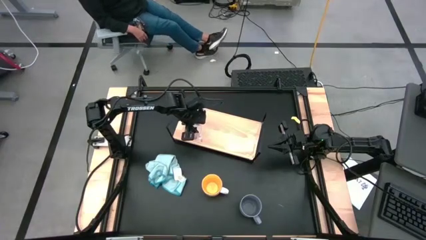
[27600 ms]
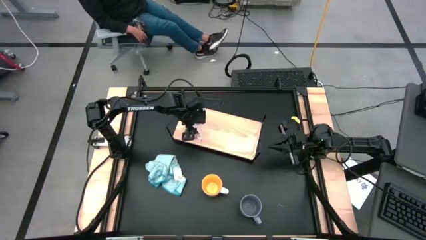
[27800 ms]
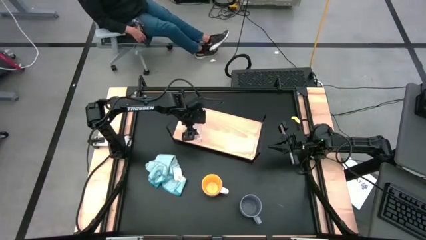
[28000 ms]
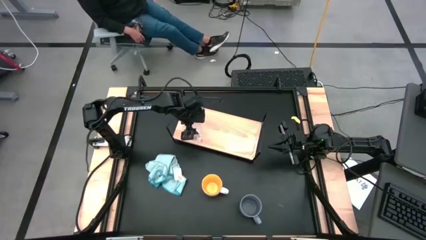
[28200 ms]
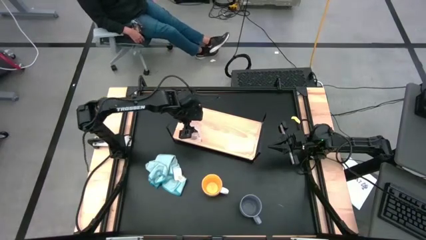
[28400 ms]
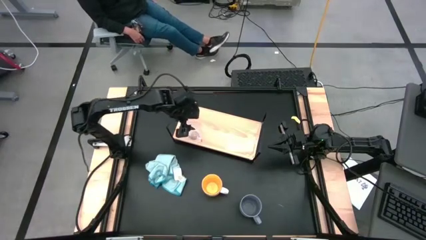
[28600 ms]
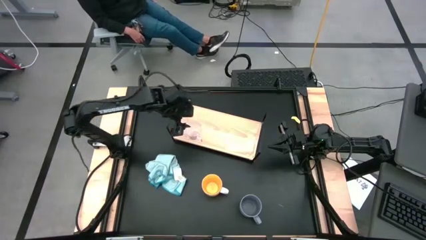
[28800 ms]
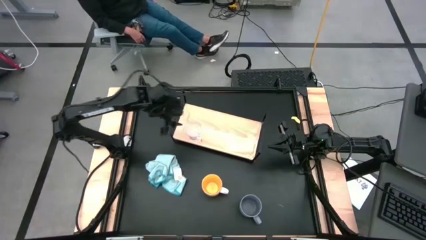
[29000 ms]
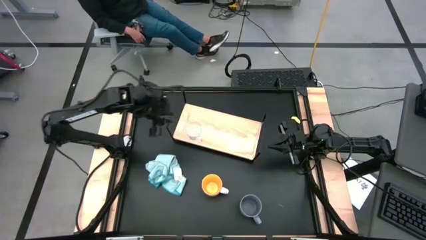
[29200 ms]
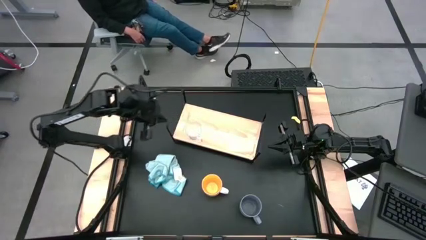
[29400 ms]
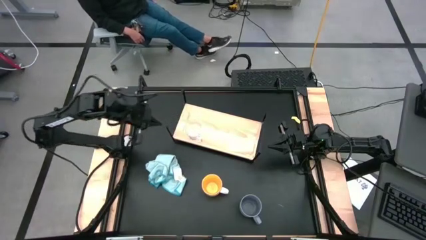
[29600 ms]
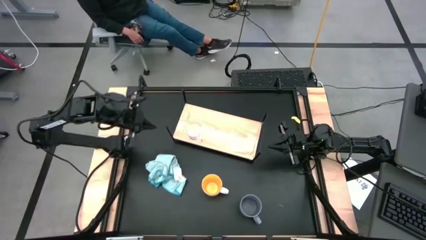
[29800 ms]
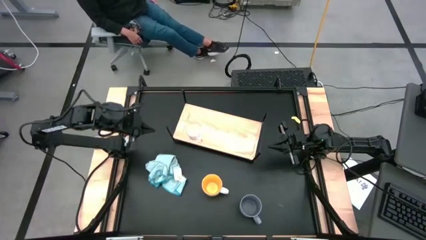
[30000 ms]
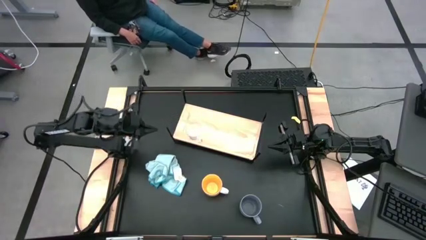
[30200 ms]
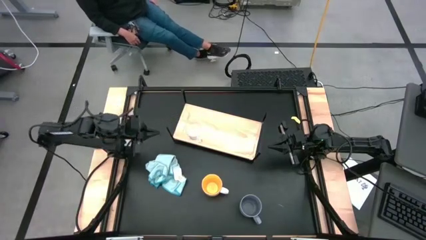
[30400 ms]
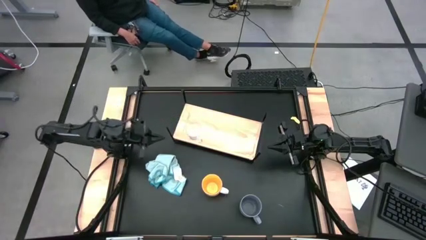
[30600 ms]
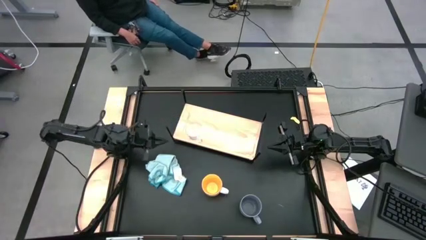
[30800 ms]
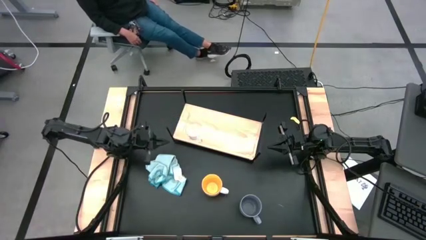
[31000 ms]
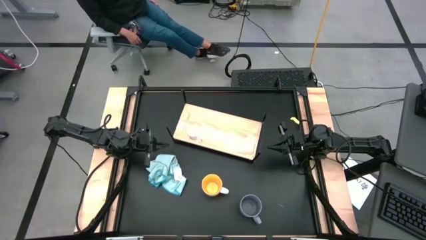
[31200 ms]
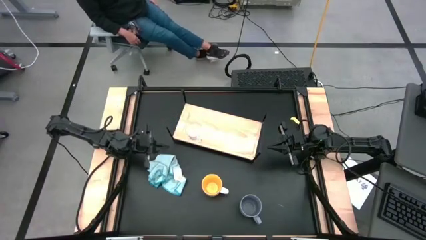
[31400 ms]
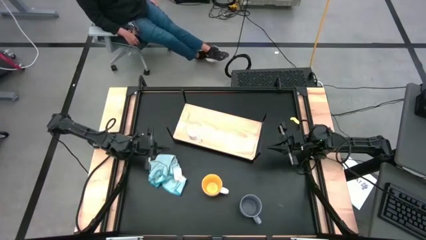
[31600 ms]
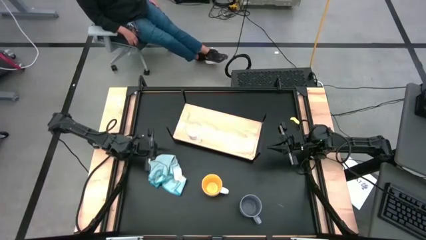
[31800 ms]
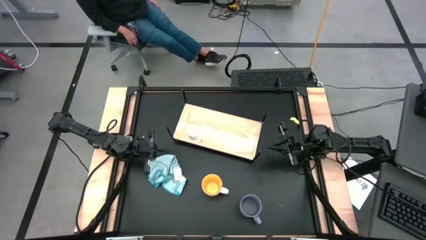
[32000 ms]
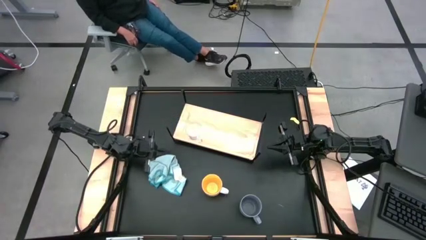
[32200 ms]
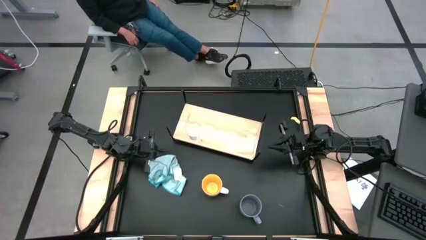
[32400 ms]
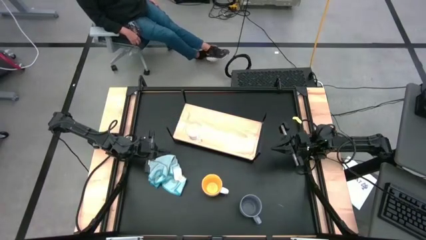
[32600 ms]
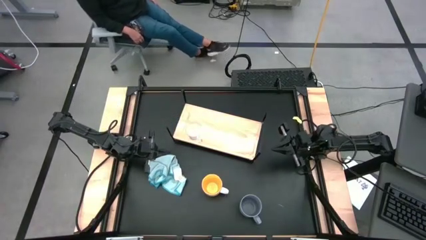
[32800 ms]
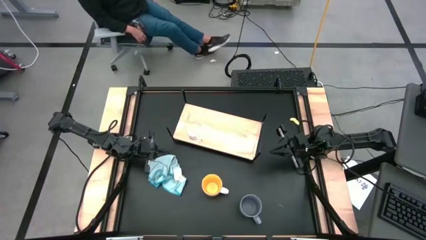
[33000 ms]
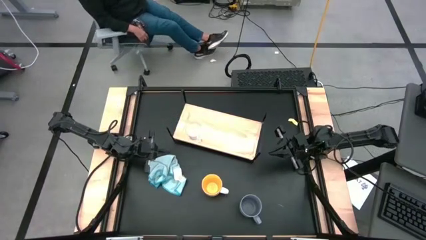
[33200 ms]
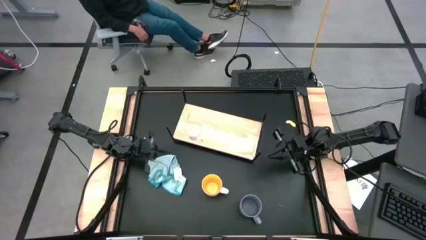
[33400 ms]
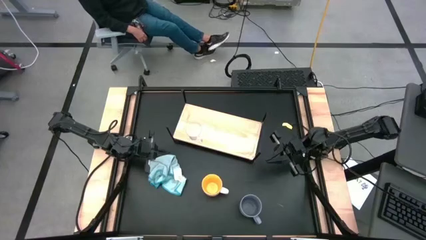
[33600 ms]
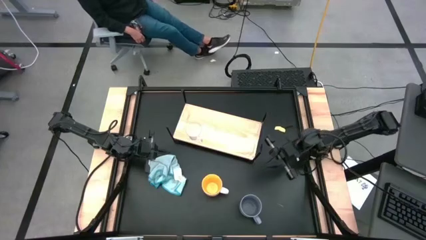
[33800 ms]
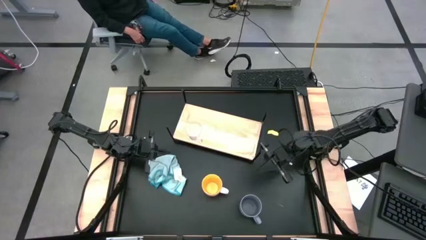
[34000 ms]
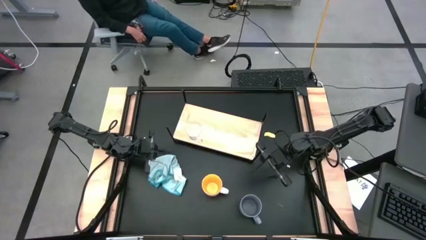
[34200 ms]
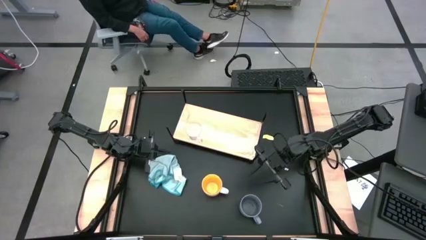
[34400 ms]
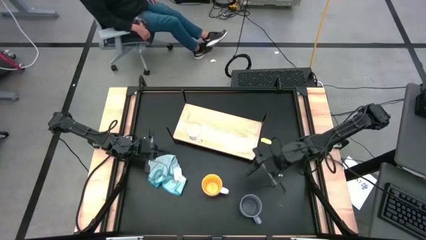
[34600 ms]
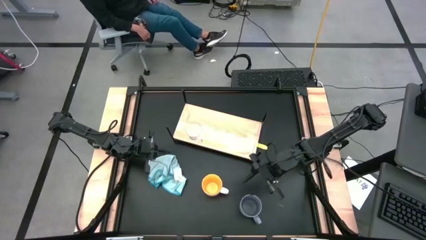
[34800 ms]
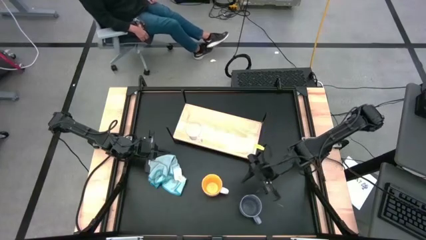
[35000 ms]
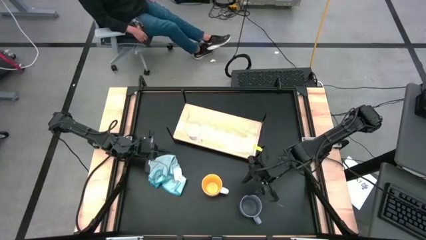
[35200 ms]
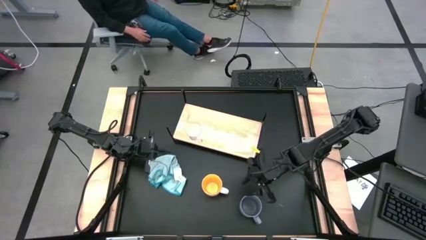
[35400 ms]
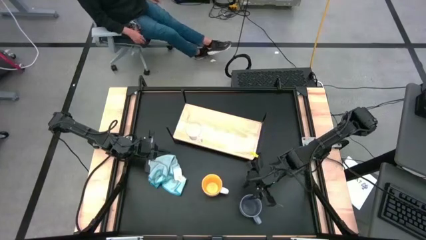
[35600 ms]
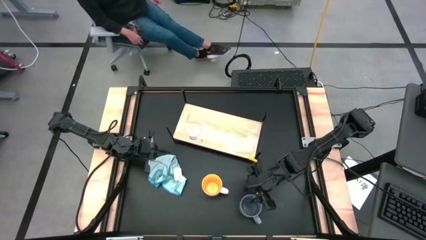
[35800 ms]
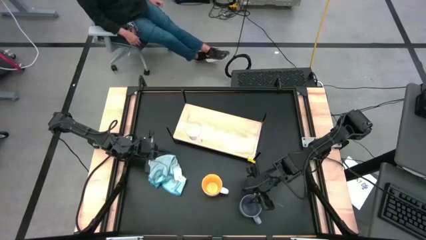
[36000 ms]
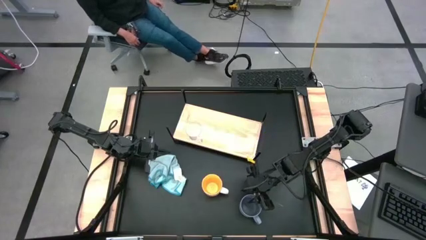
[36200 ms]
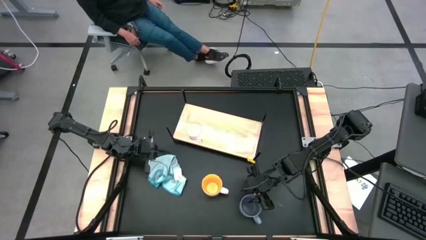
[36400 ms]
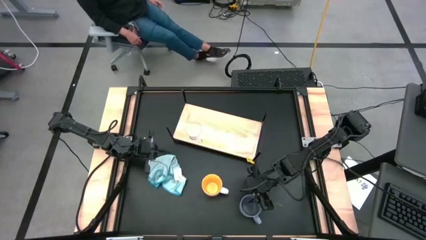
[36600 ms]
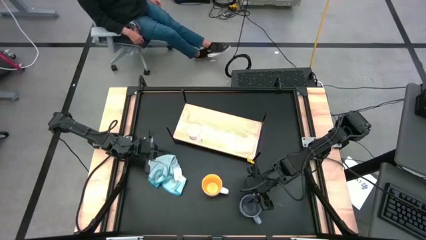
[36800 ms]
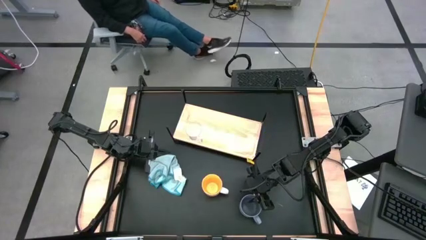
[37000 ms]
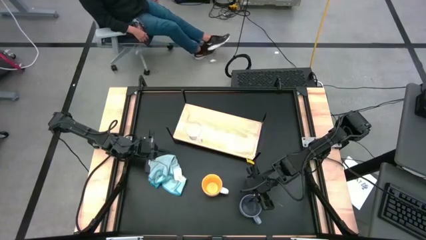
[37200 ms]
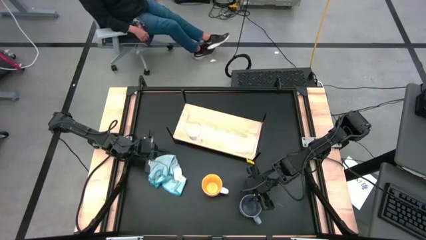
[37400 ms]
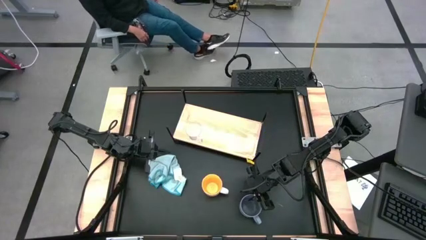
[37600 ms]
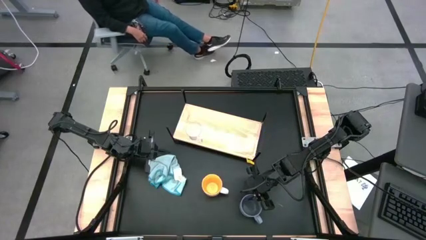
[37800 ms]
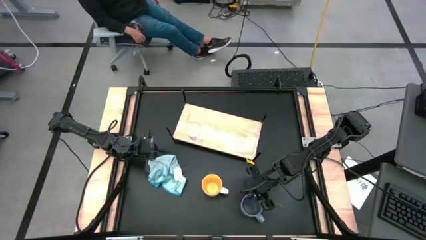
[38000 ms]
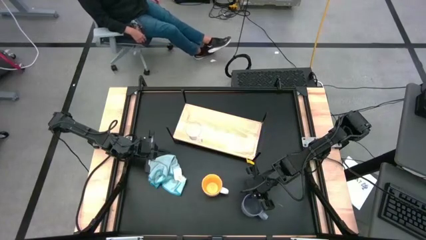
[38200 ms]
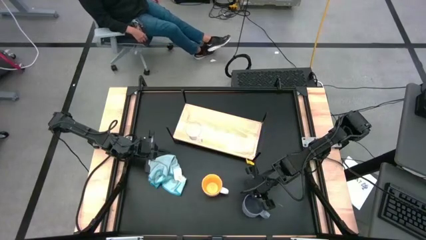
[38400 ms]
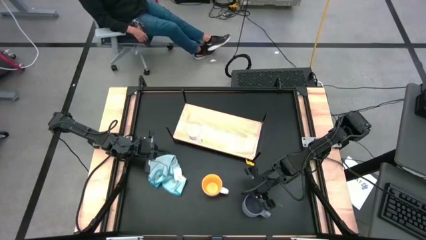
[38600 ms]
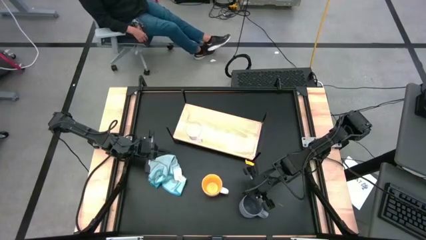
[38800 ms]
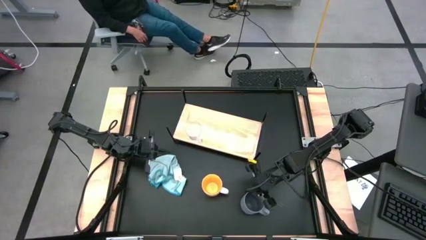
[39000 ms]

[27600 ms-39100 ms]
Task: Stack small to large cups/mugs on shelf
Put the gray mug on the shelf
